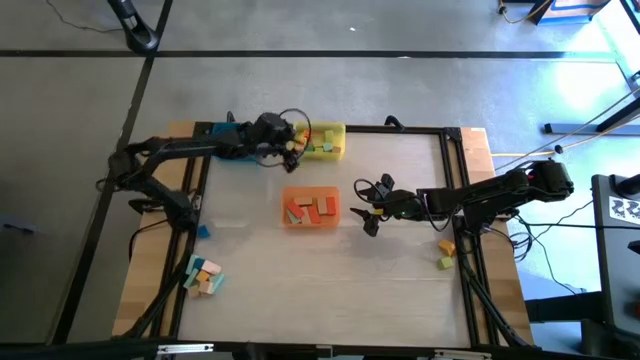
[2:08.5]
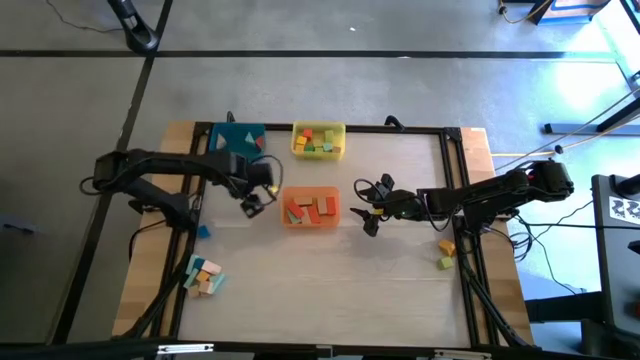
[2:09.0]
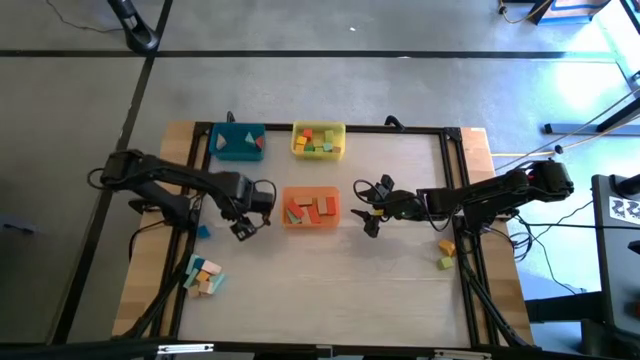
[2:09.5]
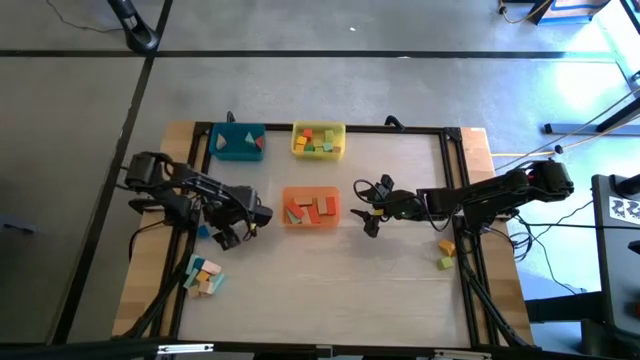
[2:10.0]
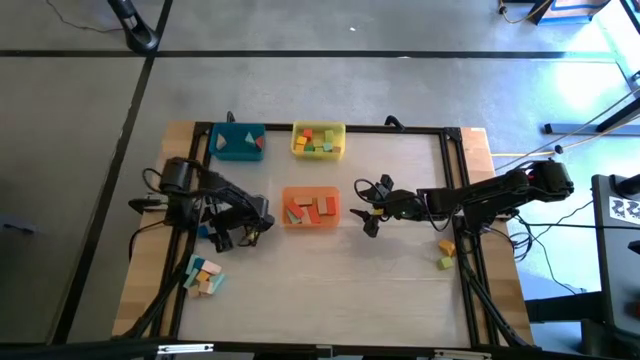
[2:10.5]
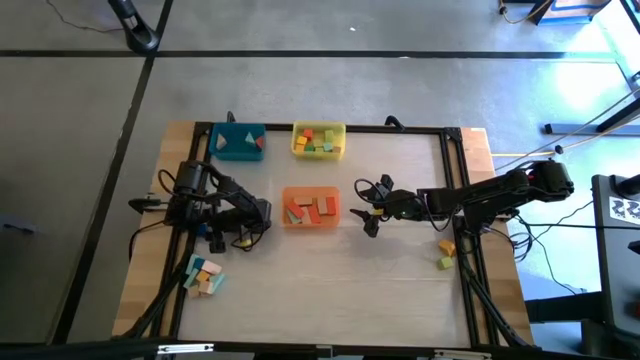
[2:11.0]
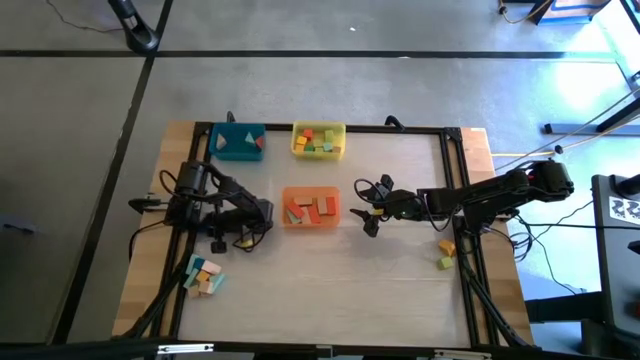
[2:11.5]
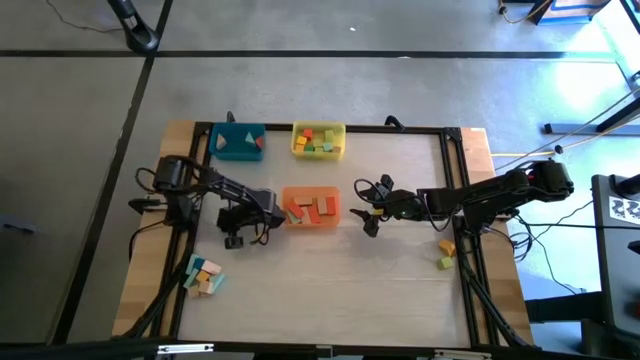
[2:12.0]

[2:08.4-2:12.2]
Task: Sort blocks by size
Put the blue square block into the yellow bin

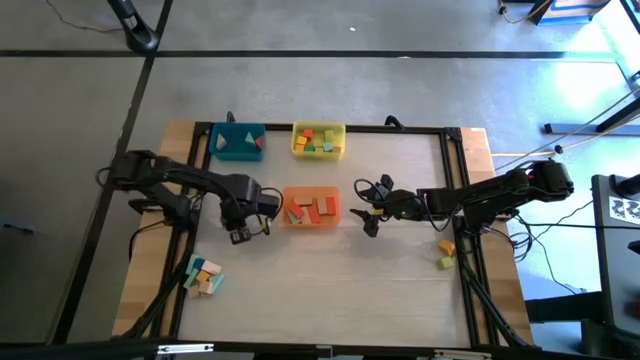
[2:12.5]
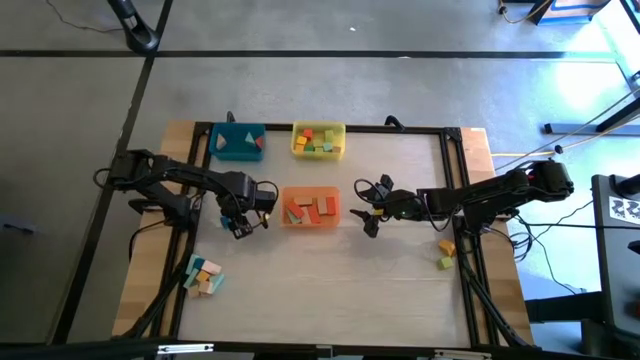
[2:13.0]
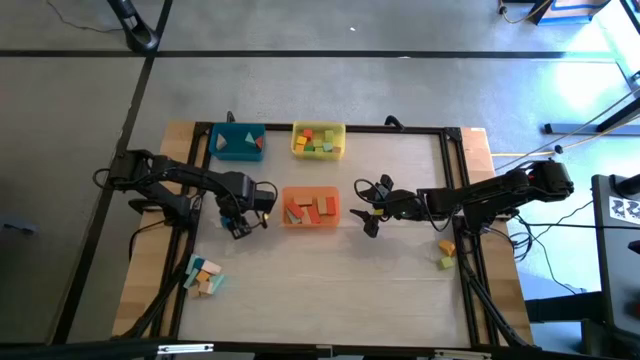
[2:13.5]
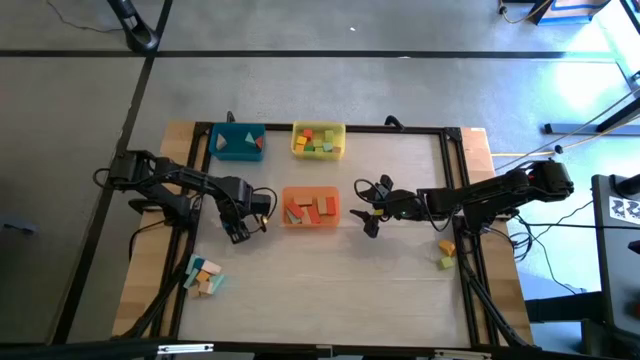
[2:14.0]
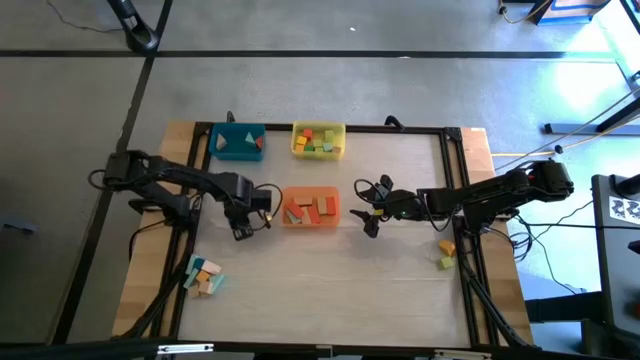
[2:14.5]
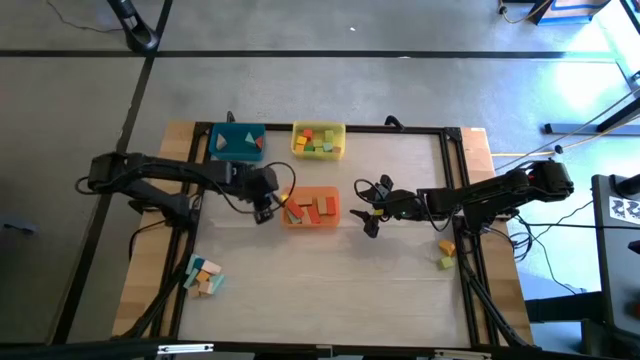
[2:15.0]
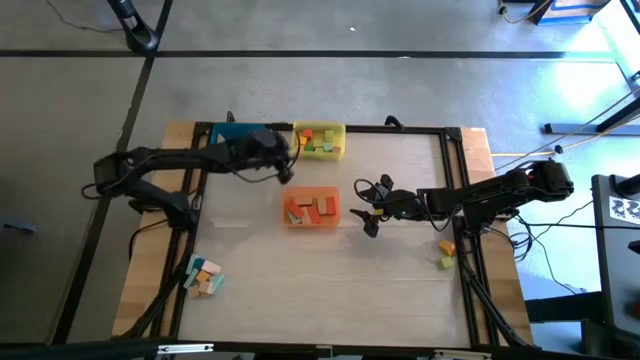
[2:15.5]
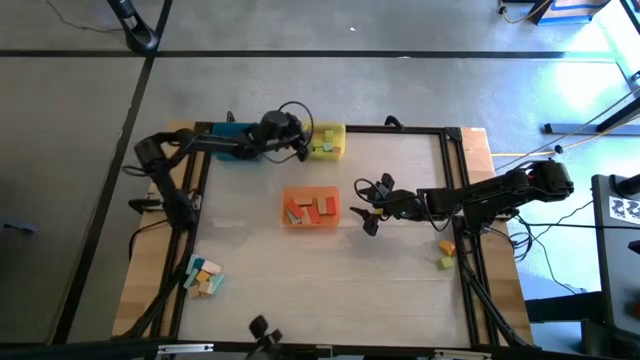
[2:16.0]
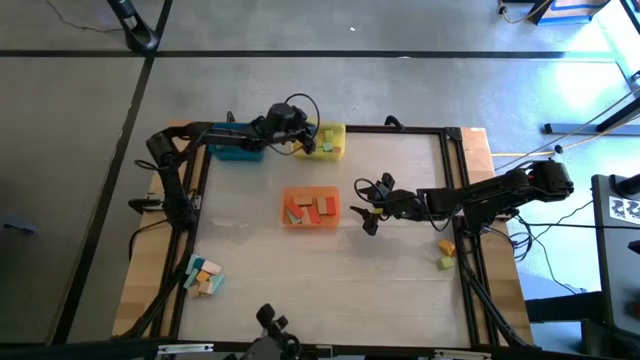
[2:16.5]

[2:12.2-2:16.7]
Put the blue square block into the yellow bin

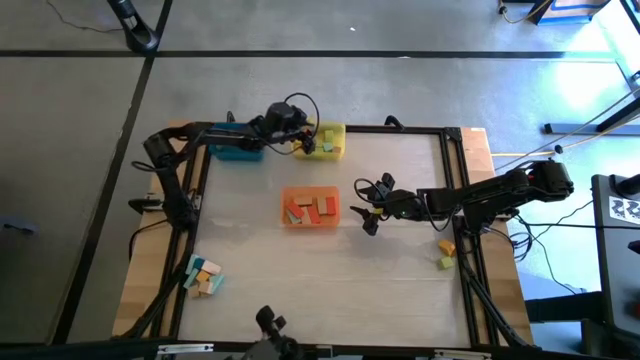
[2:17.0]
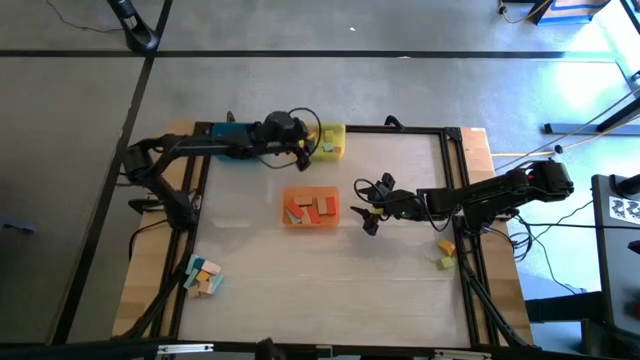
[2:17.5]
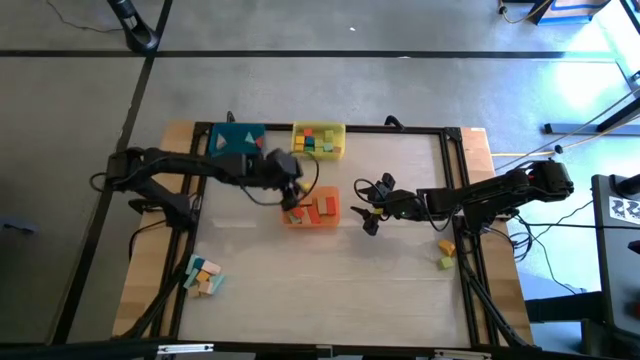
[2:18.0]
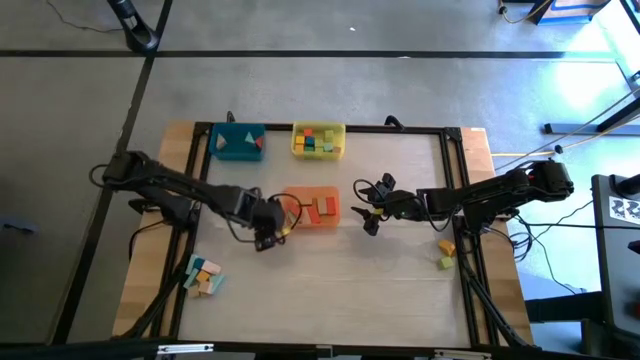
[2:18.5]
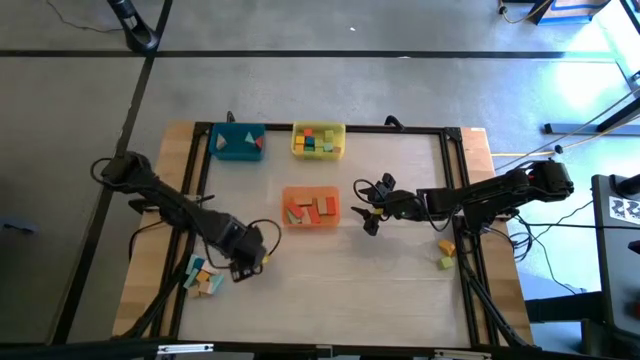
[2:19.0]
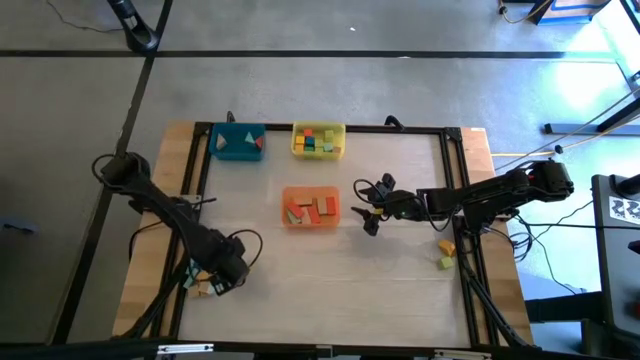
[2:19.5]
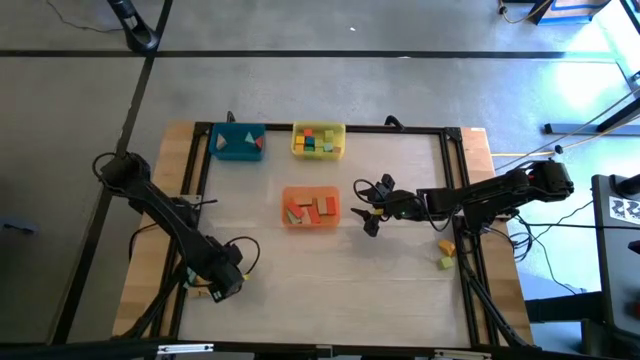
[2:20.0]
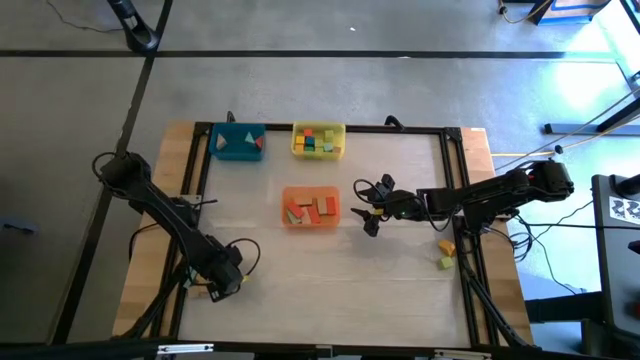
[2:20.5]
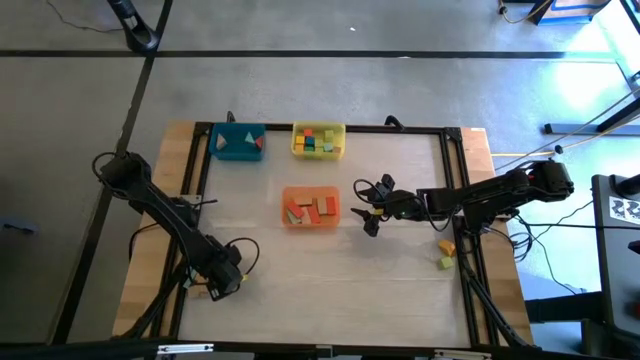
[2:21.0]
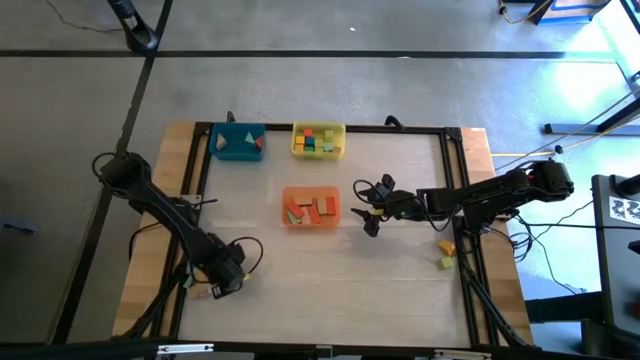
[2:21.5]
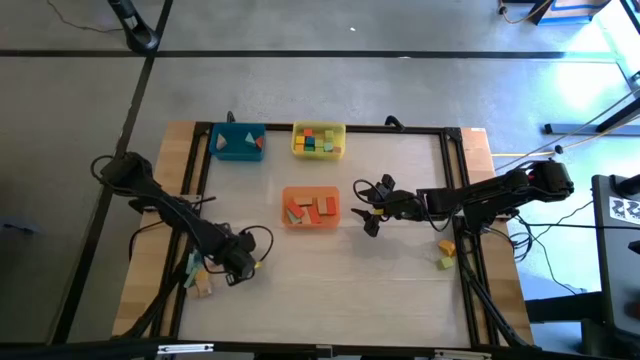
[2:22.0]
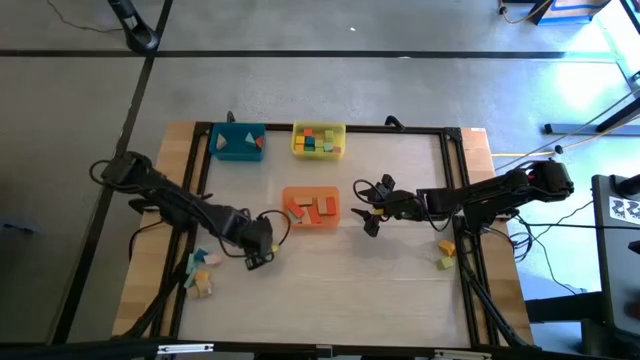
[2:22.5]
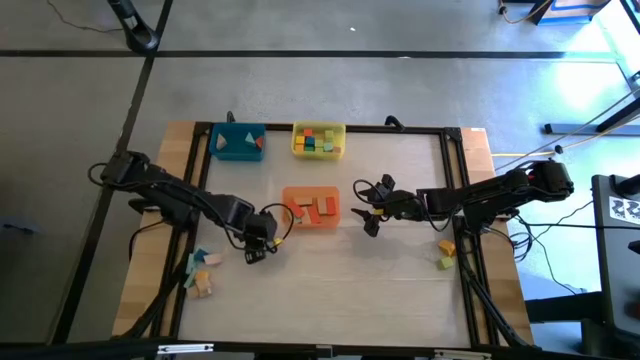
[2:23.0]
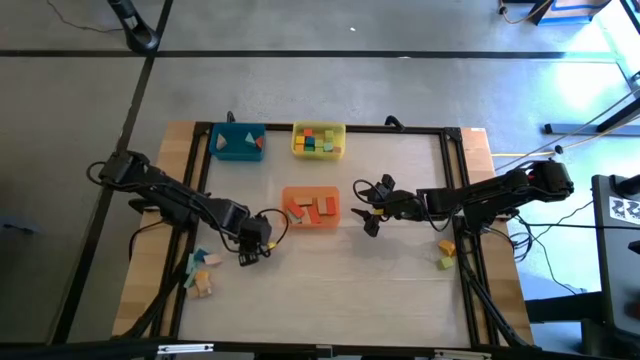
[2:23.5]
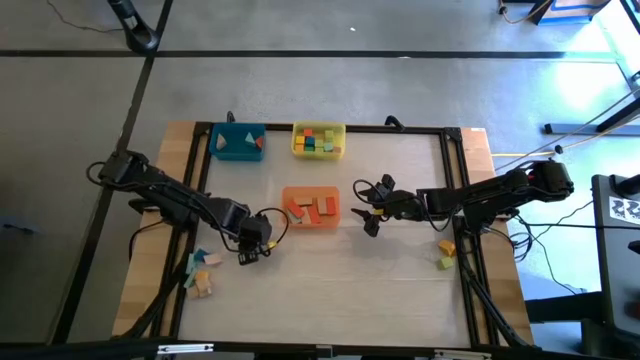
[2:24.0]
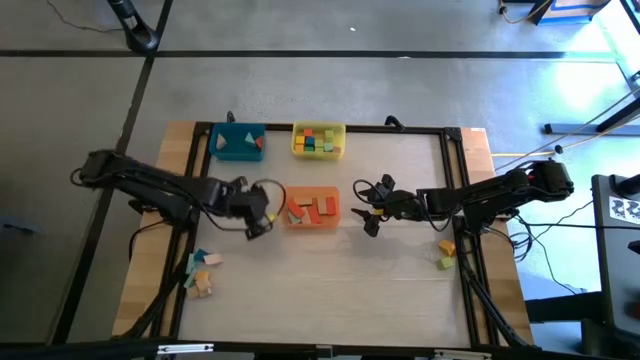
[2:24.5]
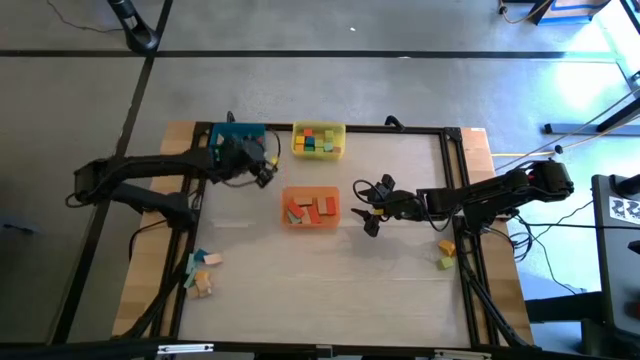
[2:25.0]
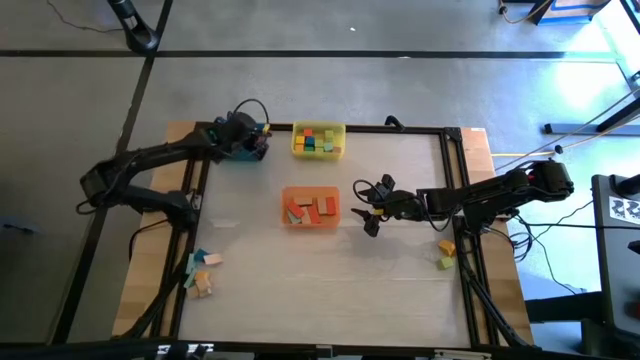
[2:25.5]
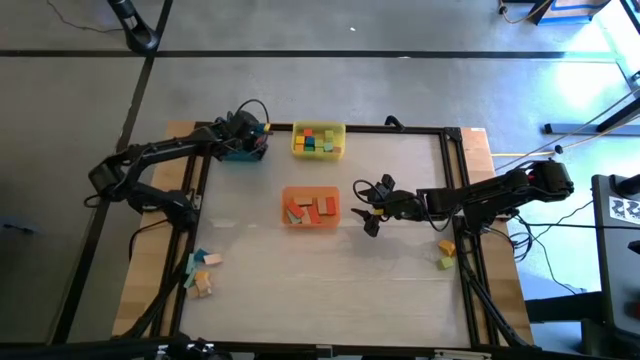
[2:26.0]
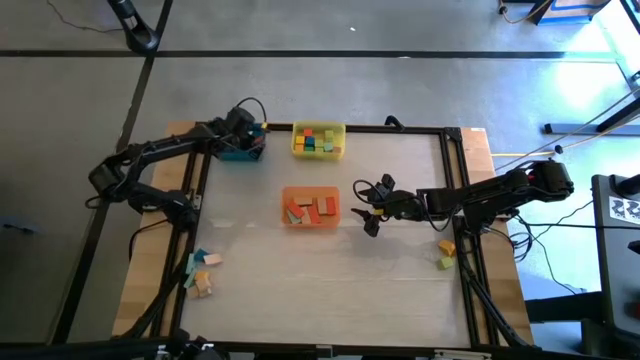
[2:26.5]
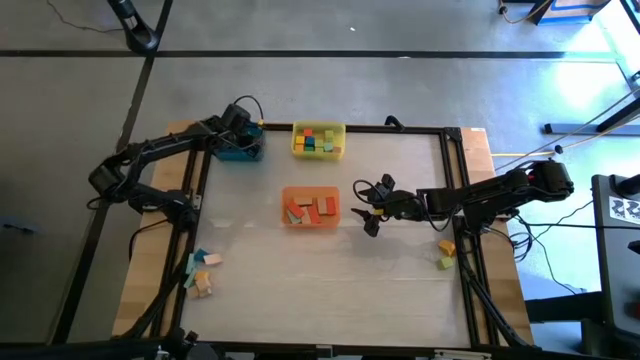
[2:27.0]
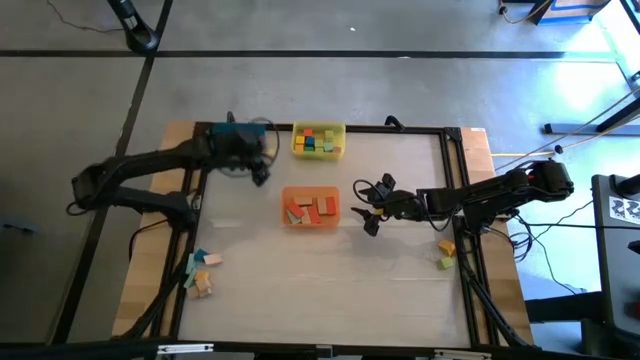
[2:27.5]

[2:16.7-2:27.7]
Put the light blue triangle block into the blue bin

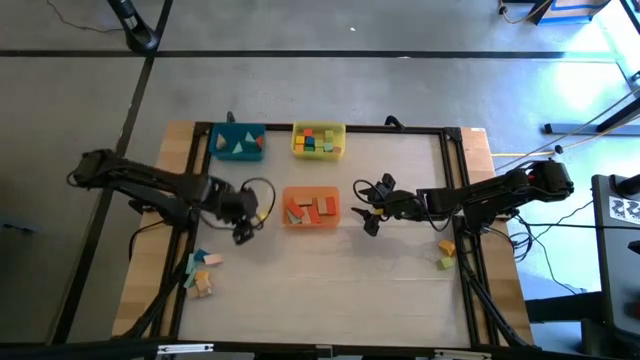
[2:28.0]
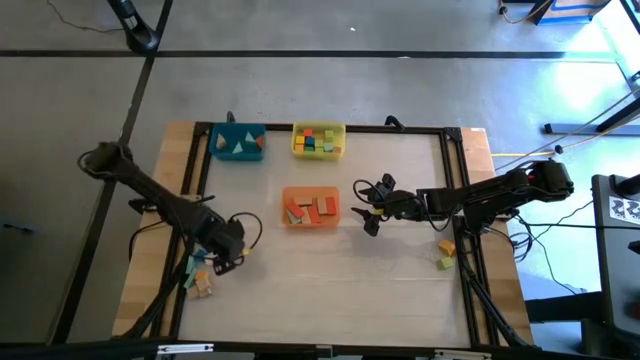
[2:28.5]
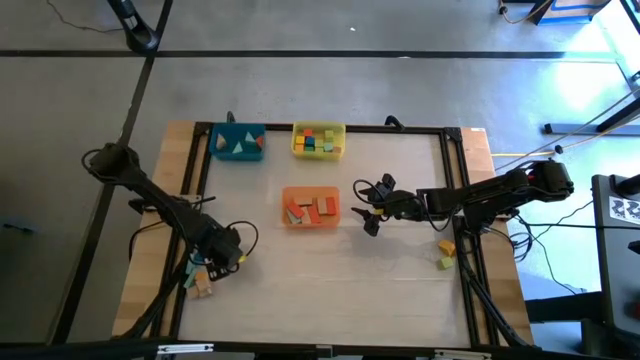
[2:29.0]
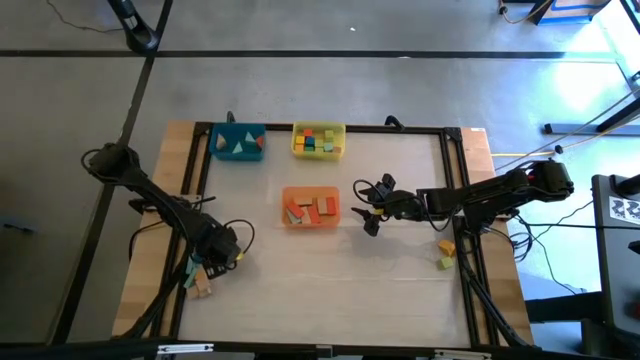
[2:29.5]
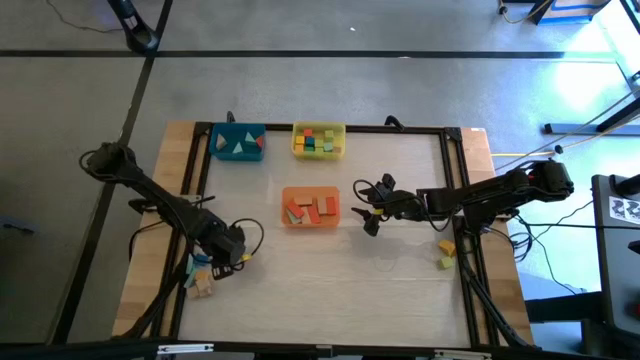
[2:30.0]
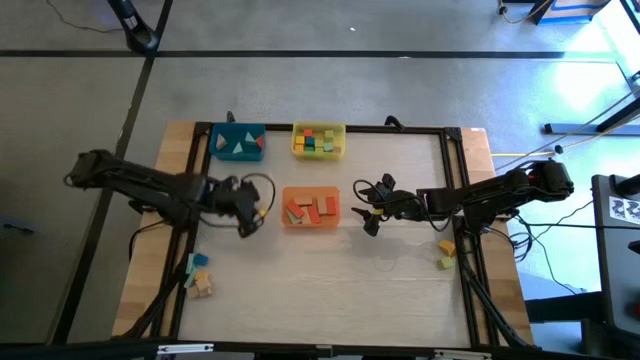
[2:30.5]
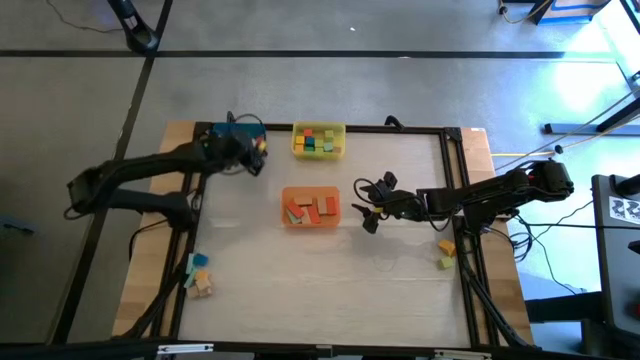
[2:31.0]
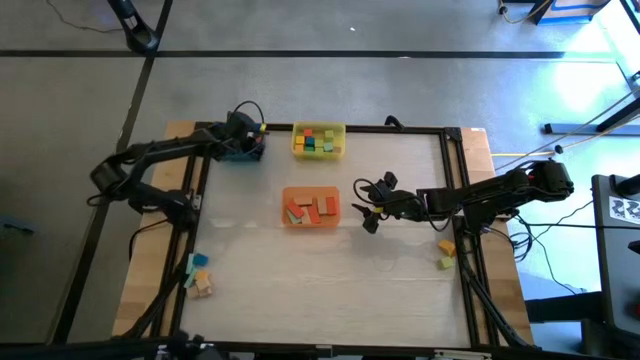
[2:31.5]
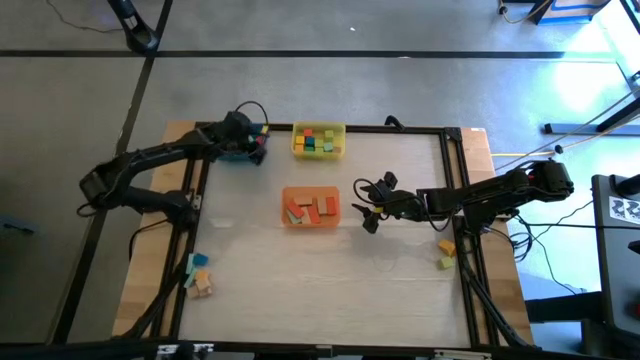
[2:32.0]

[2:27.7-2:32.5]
Put the brown triangle block into the blue bin
